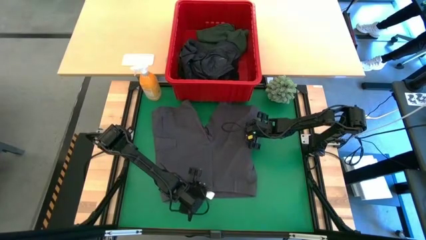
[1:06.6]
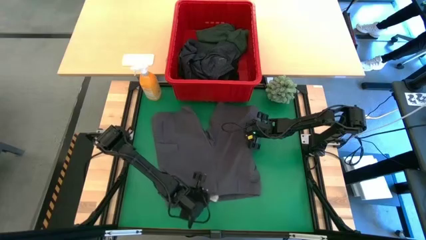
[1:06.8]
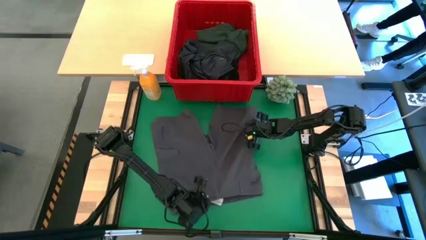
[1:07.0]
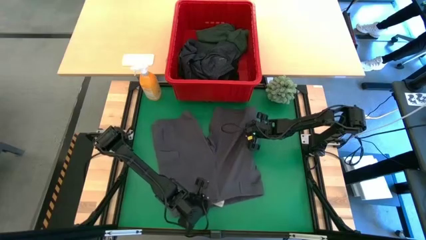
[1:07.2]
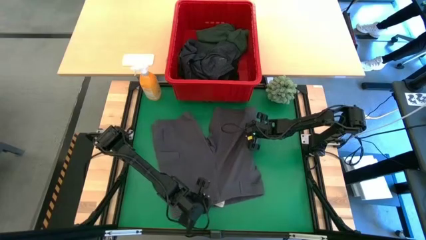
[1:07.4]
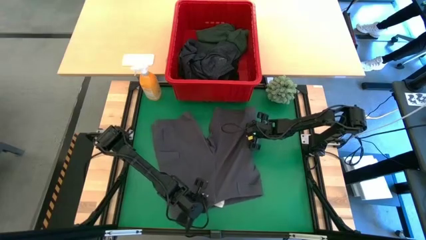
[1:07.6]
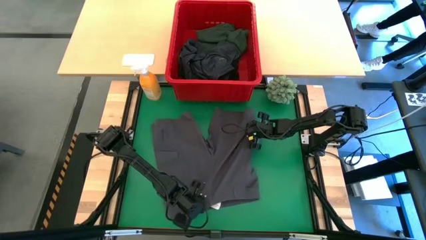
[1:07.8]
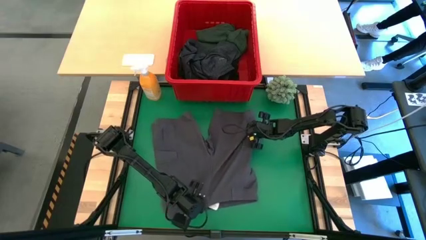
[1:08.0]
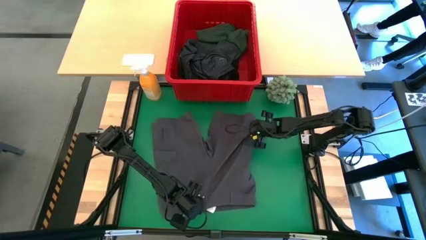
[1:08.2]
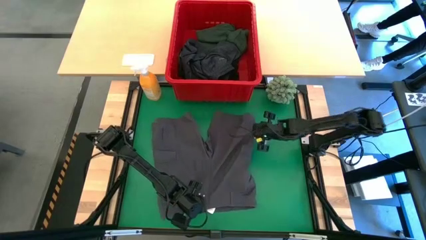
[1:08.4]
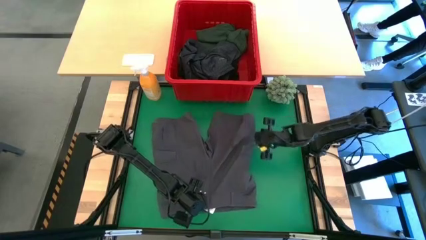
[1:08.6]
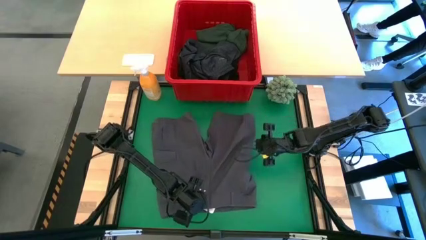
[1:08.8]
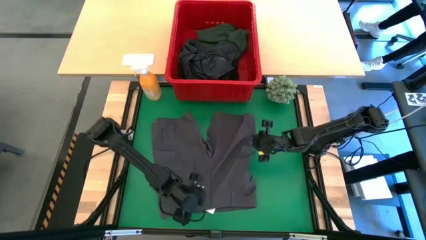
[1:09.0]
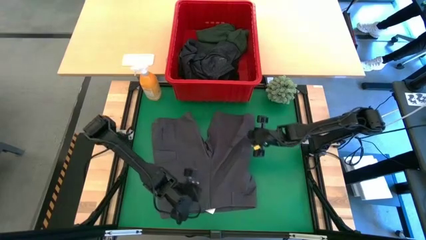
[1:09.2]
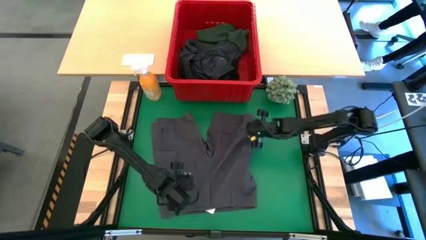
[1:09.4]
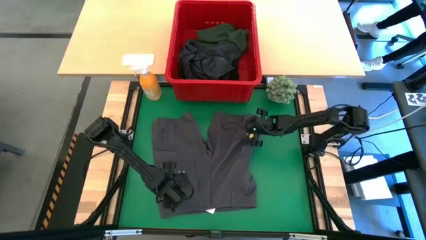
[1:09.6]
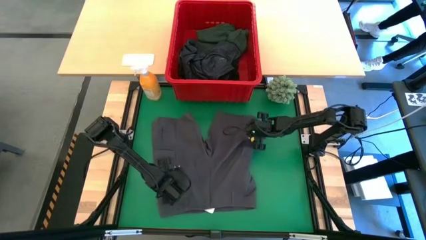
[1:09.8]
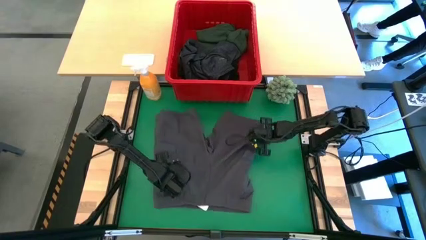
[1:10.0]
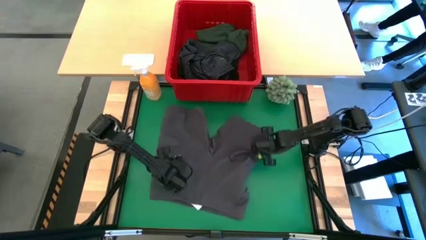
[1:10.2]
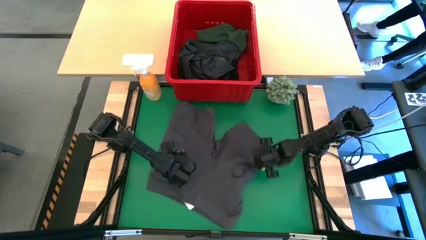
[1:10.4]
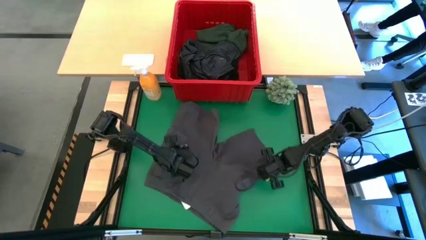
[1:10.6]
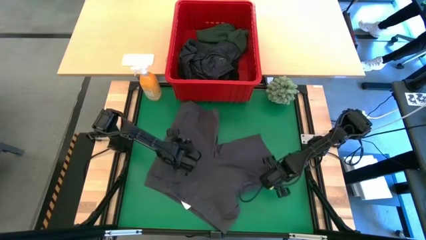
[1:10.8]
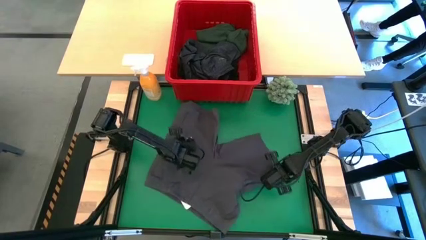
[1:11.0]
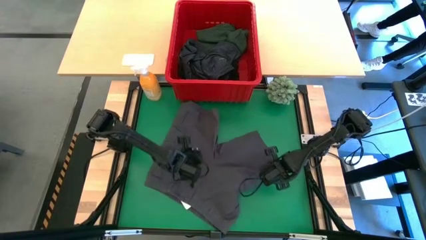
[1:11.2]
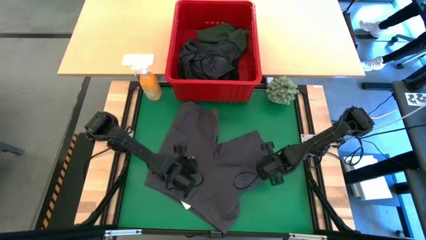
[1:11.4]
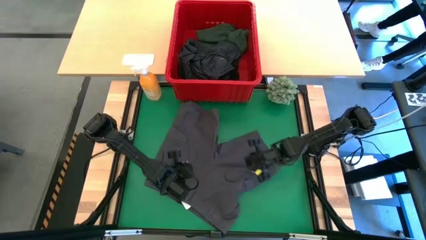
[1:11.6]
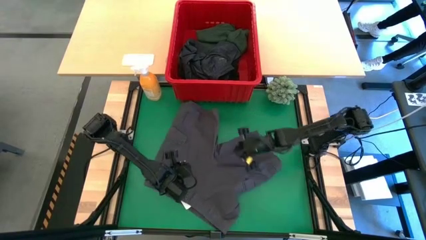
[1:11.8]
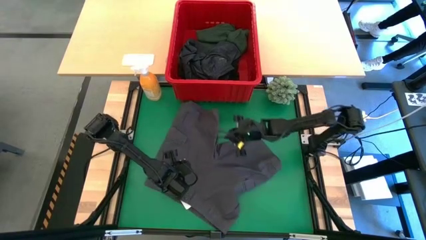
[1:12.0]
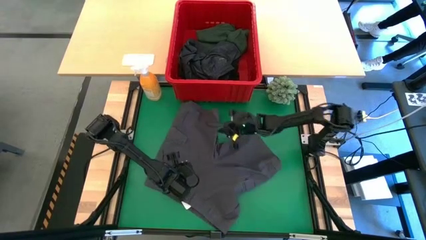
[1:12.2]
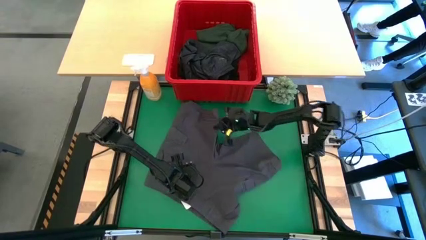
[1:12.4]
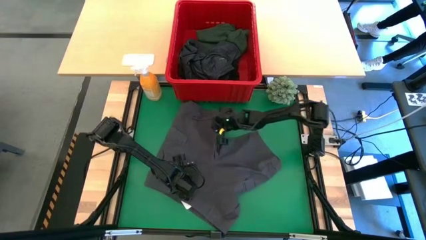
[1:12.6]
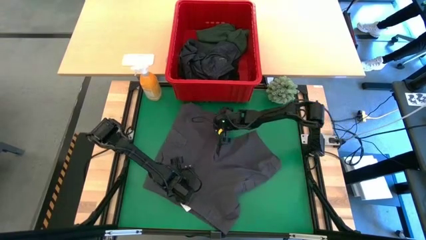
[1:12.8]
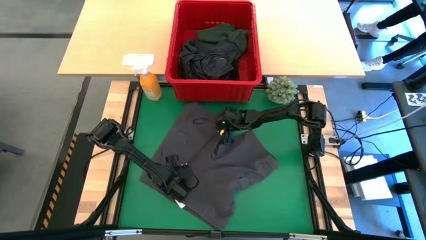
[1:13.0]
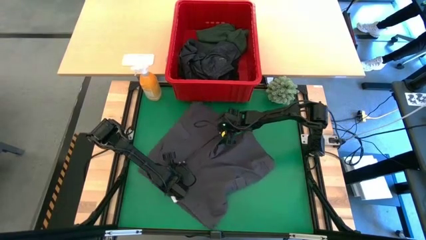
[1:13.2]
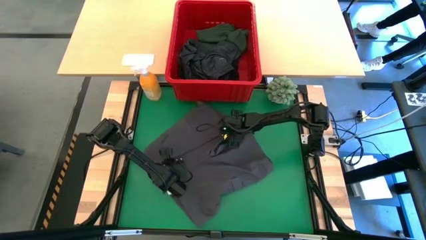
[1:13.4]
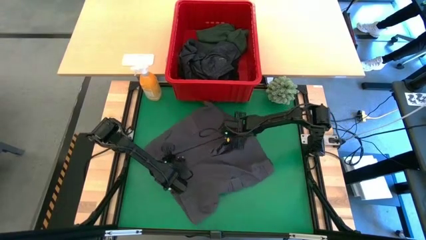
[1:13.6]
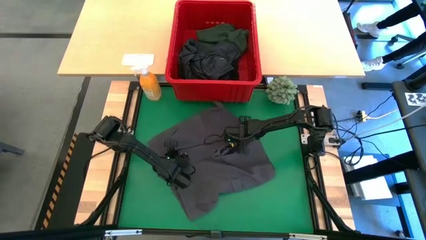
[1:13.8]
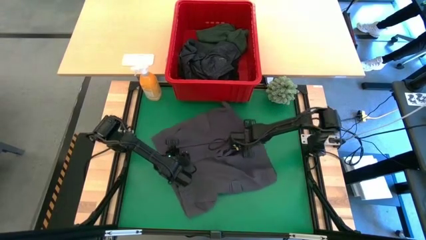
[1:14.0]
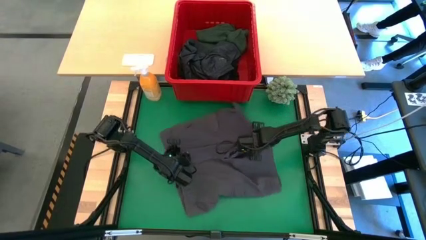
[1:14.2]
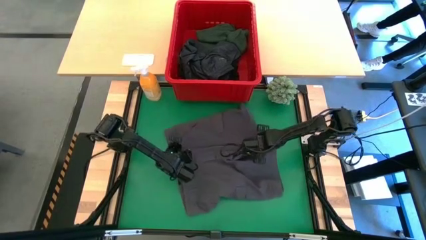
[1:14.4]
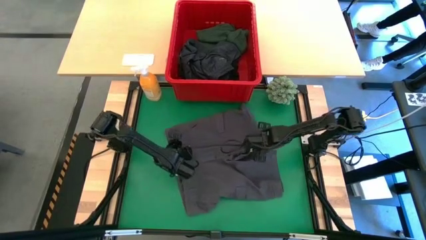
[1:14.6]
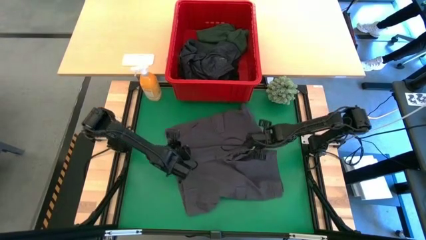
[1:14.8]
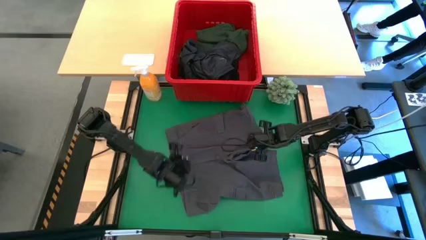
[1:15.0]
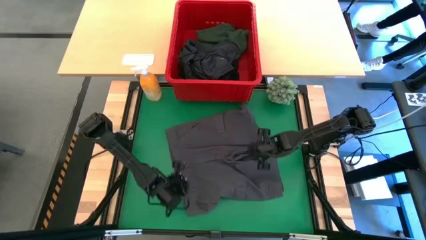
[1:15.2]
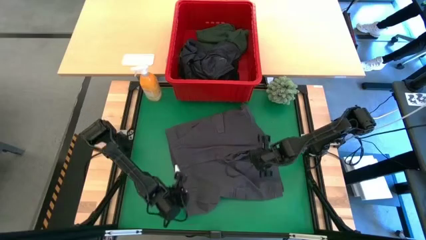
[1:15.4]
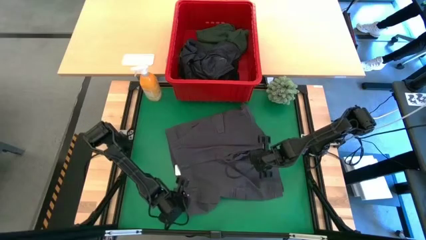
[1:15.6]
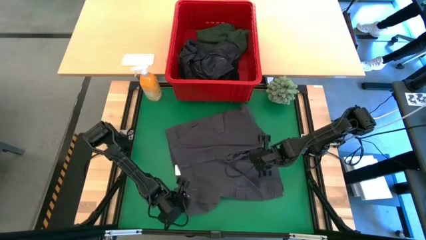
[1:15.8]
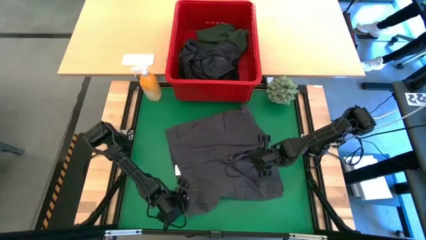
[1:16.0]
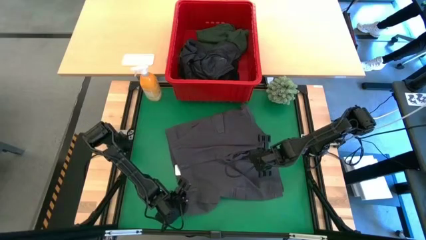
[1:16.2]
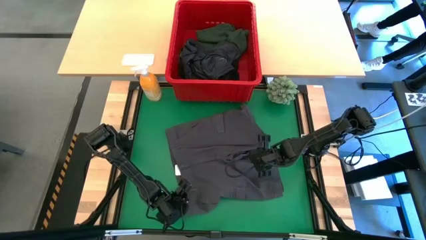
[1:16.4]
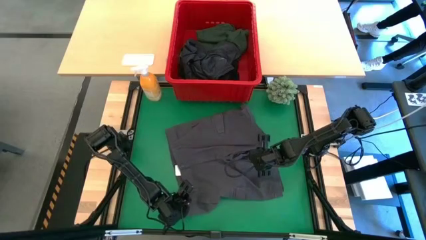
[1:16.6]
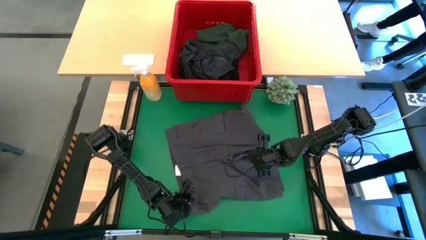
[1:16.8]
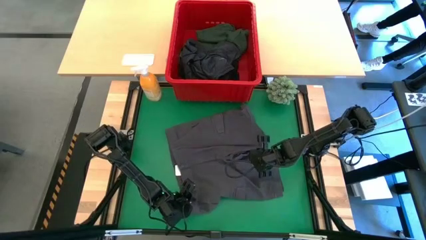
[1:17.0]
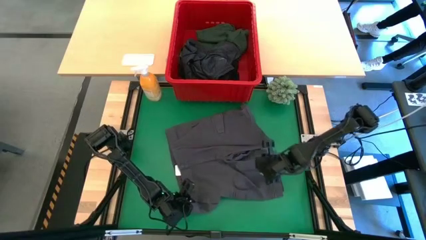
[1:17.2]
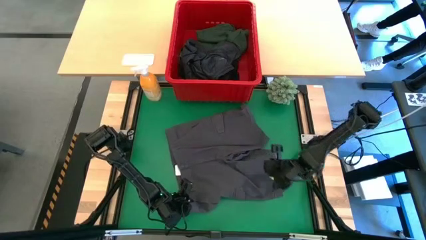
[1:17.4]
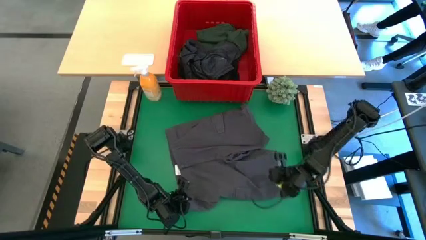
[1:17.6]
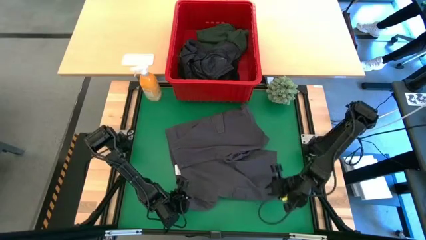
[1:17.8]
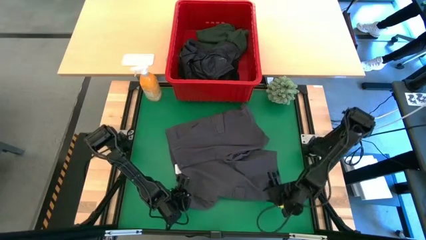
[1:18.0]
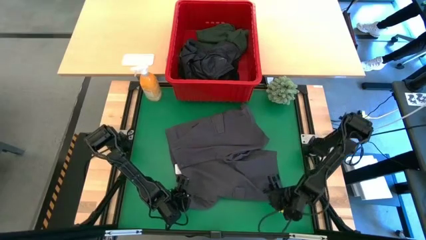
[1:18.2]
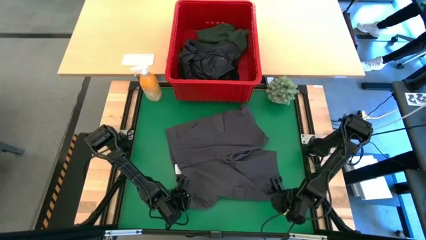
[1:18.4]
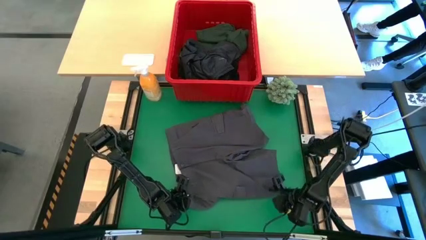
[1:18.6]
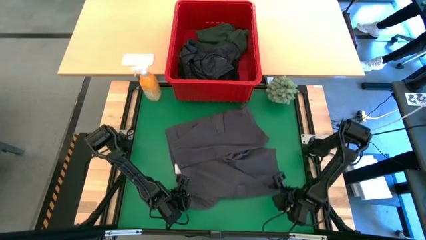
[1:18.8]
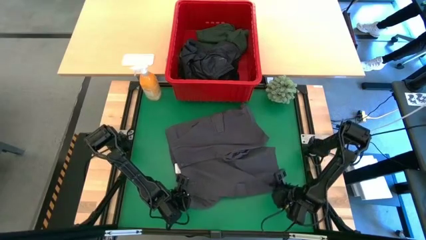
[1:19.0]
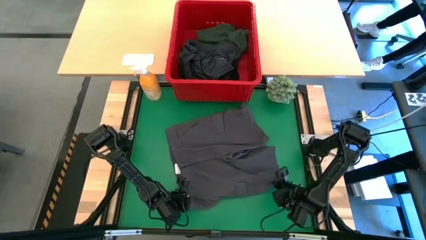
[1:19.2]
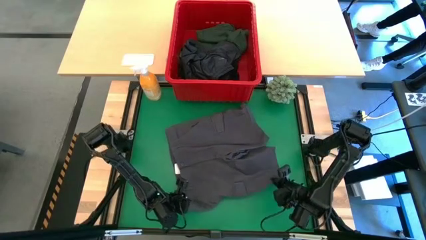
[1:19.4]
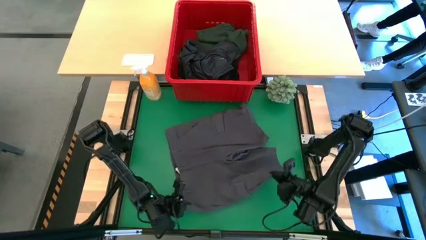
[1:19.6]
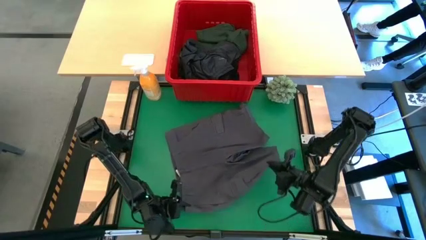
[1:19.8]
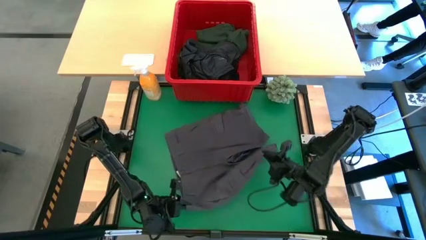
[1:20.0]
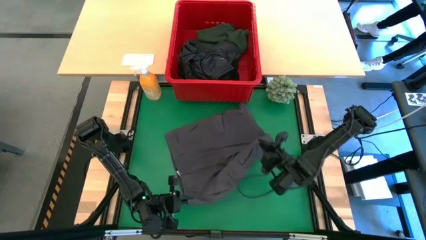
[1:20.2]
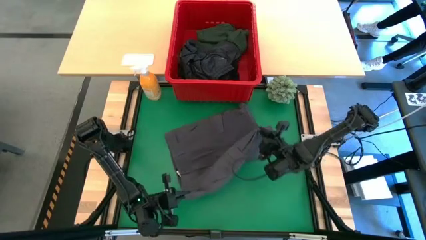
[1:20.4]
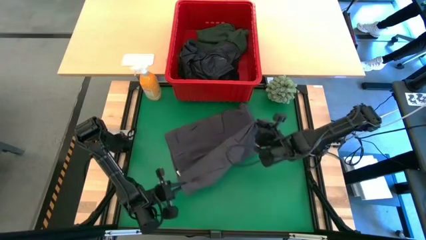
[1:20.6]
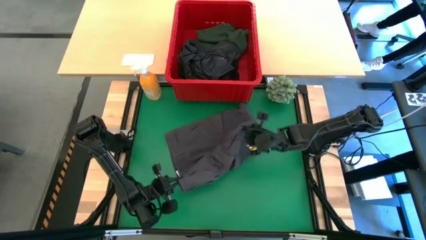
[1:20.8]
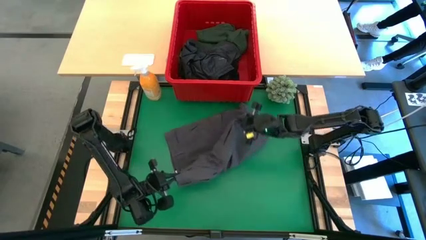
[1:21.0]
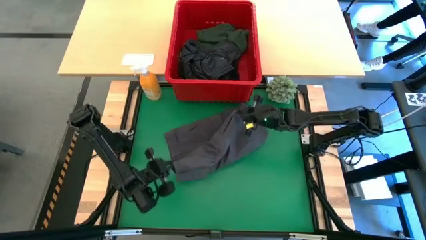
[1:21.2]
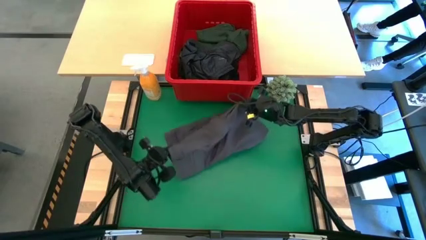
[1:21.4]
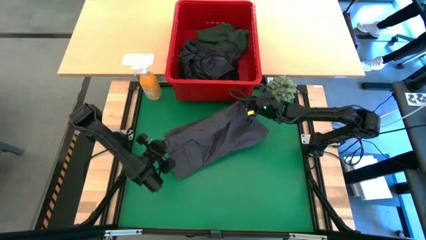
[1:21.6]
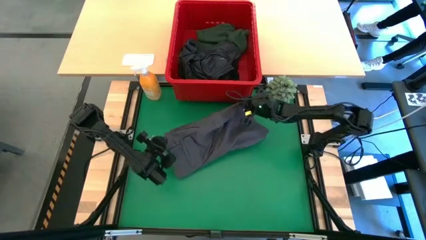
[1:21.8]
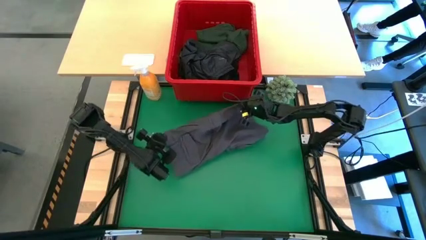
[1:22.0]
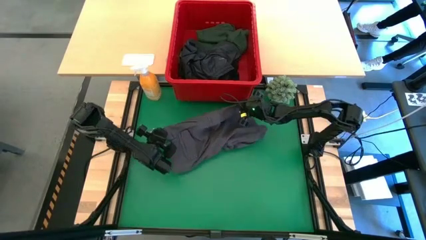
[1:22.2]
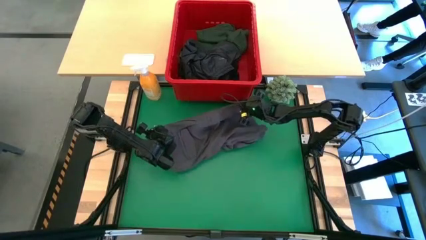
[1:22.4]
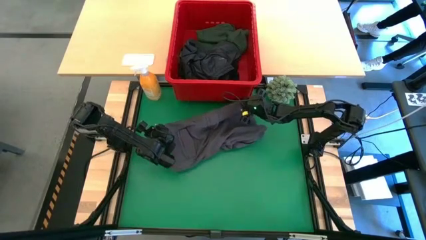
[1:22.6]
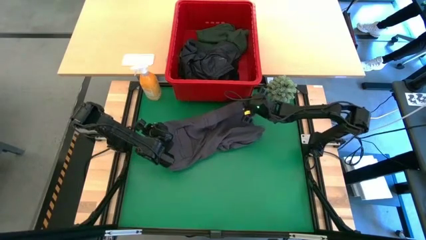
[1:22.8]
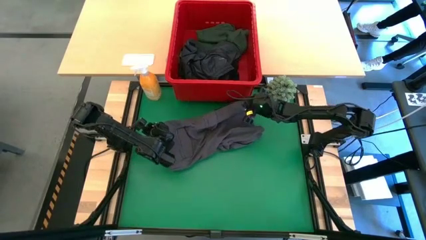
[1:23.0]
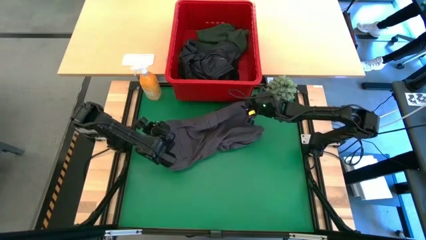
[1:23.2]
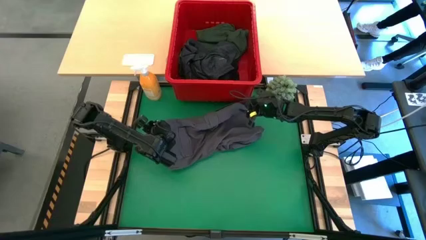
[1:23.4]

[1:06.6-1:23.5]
Task: Fold Laundry from Bin
Fold the gray short
